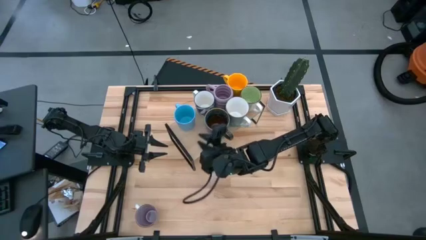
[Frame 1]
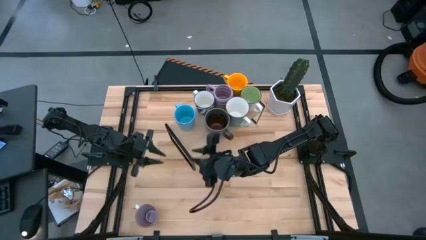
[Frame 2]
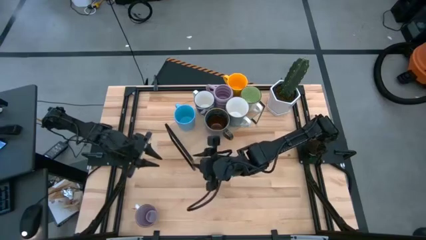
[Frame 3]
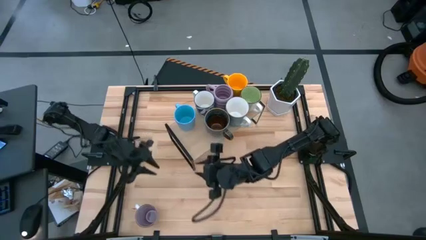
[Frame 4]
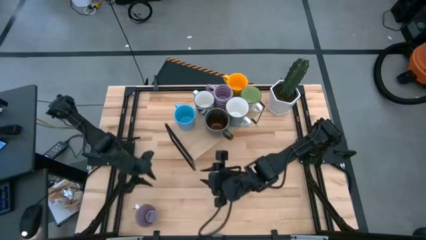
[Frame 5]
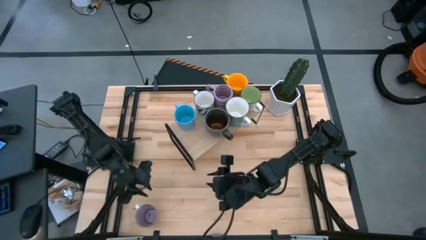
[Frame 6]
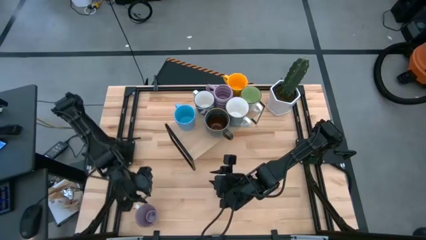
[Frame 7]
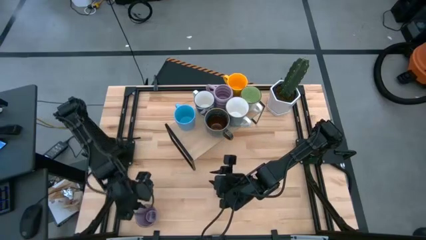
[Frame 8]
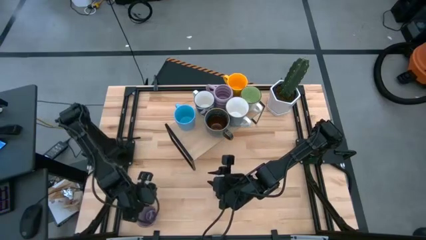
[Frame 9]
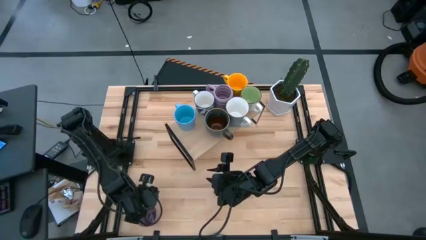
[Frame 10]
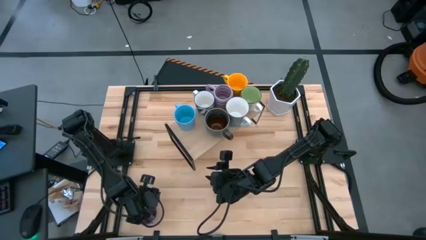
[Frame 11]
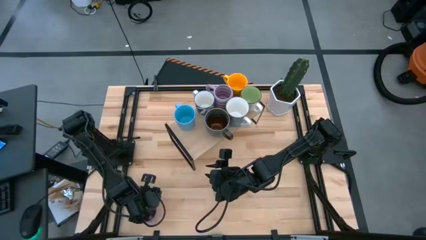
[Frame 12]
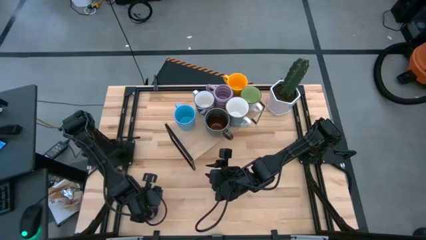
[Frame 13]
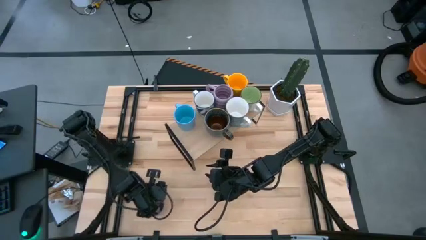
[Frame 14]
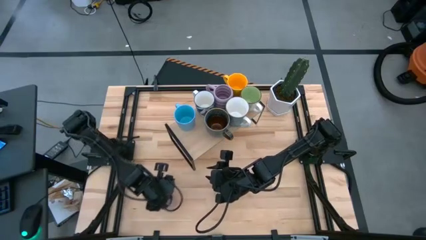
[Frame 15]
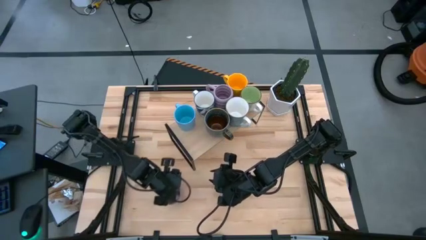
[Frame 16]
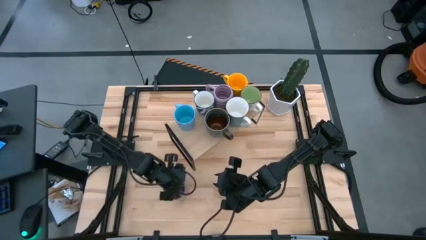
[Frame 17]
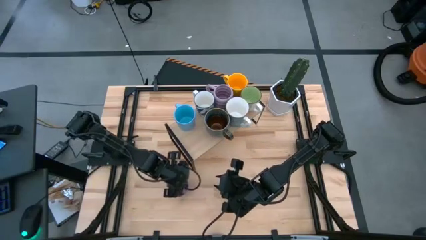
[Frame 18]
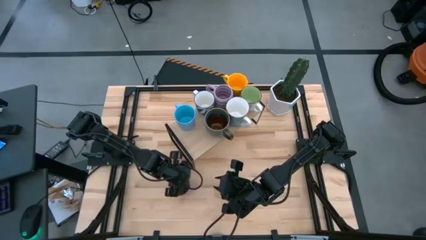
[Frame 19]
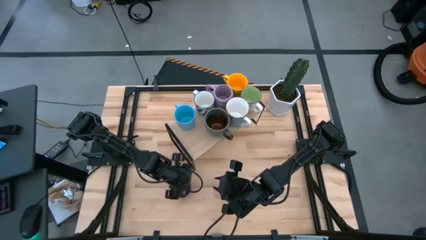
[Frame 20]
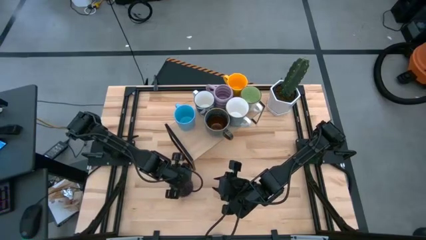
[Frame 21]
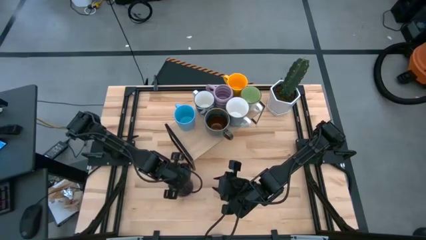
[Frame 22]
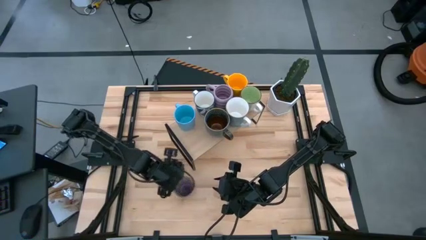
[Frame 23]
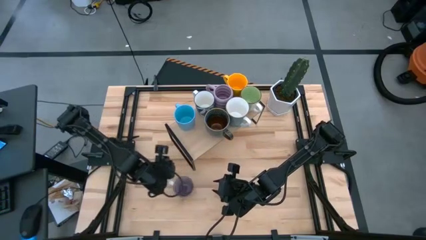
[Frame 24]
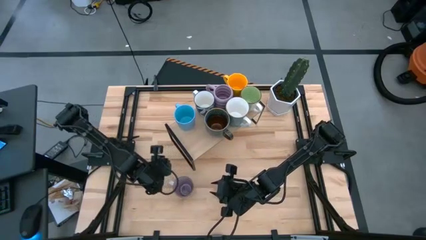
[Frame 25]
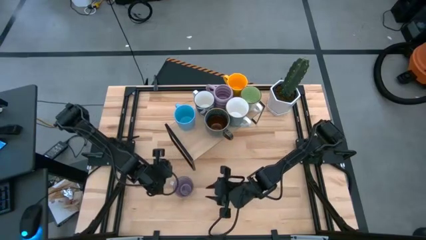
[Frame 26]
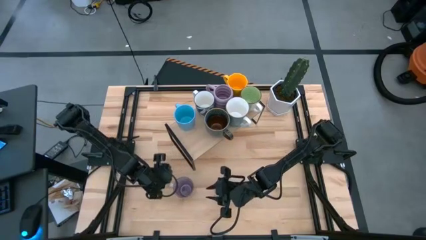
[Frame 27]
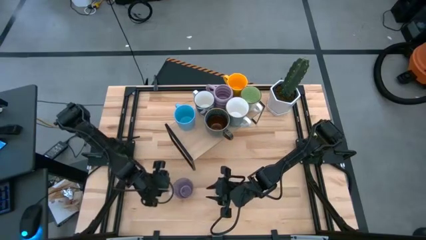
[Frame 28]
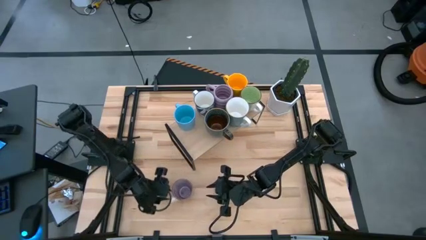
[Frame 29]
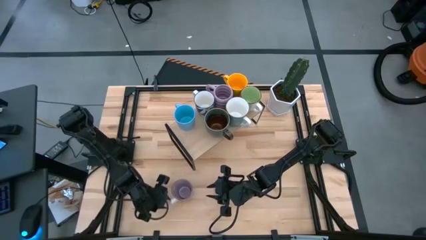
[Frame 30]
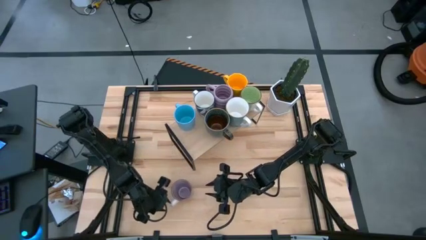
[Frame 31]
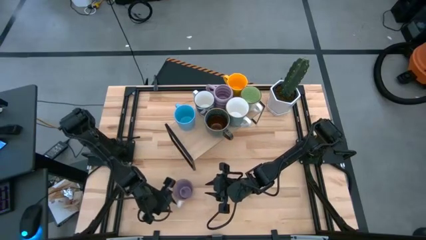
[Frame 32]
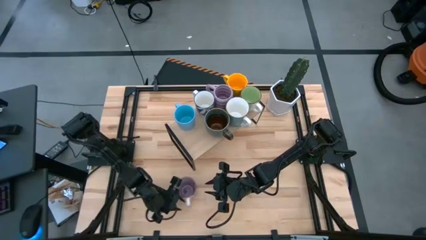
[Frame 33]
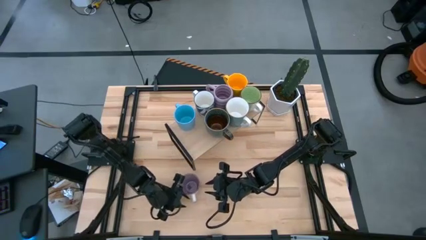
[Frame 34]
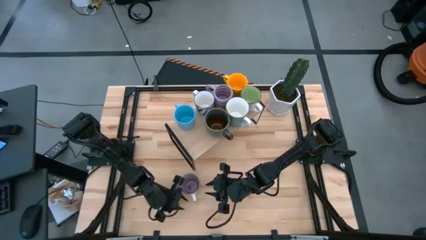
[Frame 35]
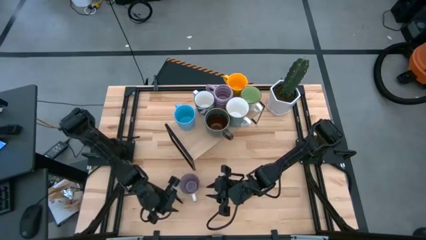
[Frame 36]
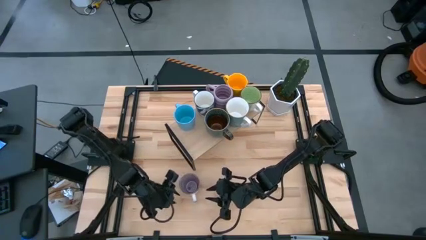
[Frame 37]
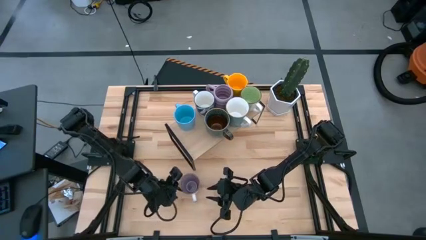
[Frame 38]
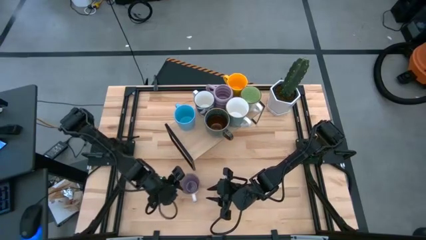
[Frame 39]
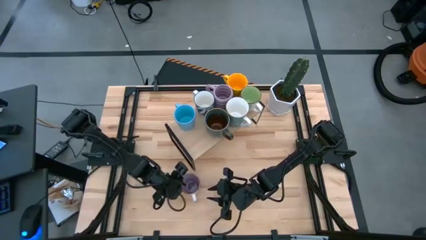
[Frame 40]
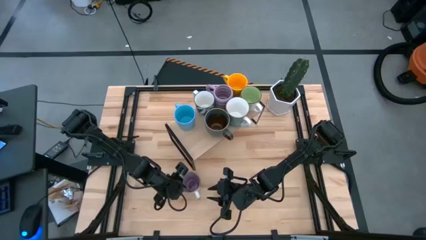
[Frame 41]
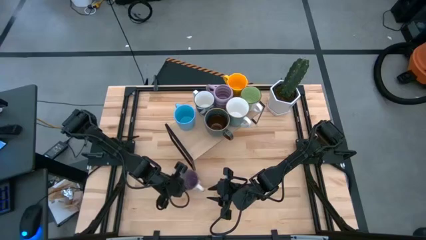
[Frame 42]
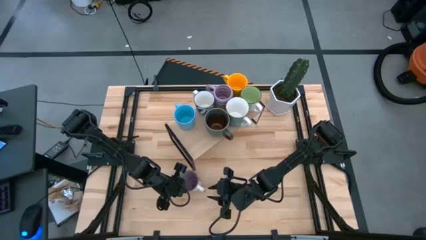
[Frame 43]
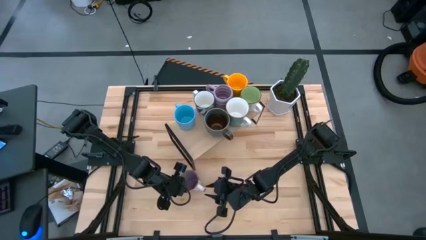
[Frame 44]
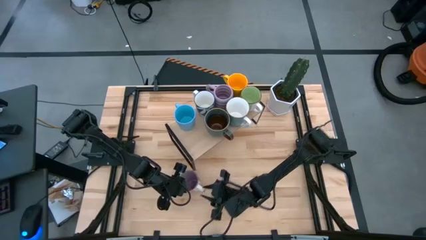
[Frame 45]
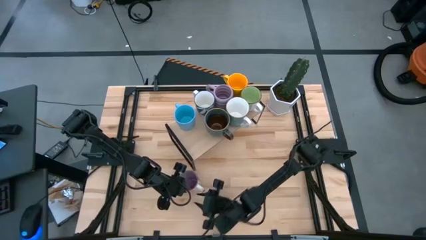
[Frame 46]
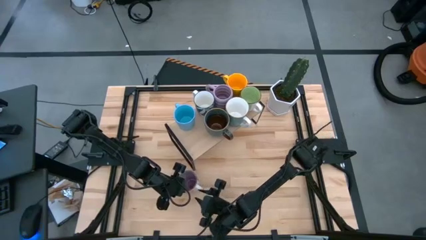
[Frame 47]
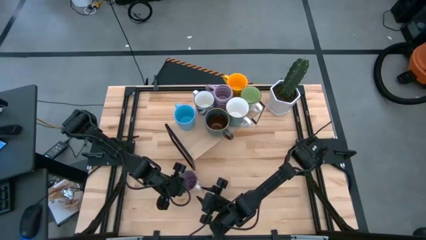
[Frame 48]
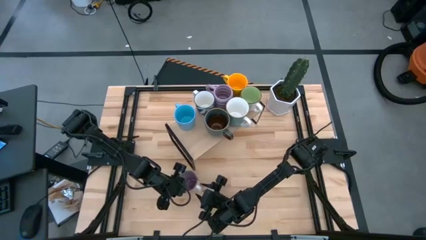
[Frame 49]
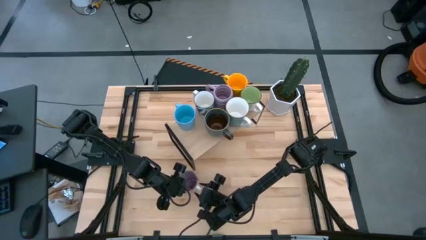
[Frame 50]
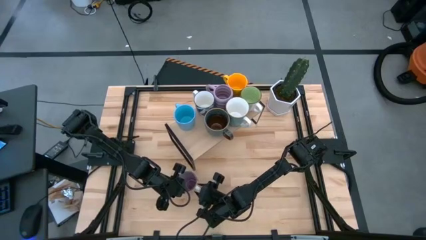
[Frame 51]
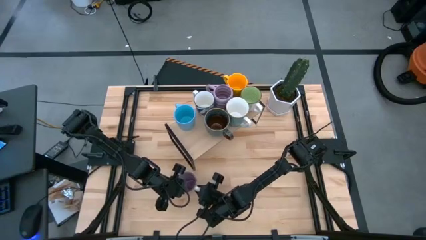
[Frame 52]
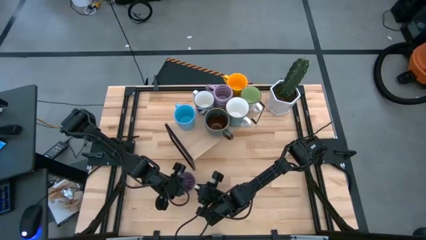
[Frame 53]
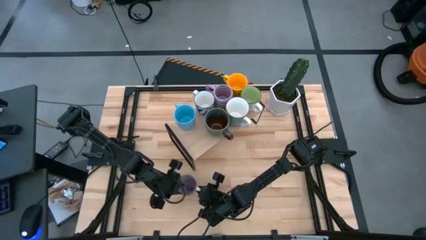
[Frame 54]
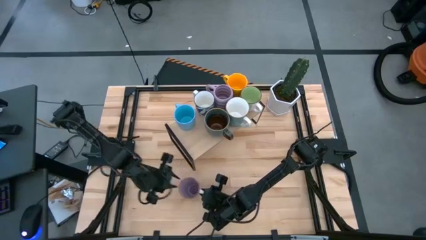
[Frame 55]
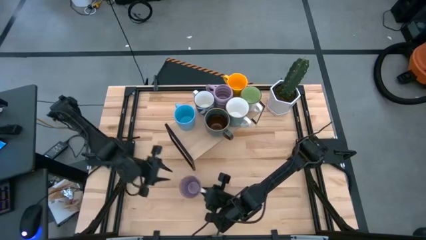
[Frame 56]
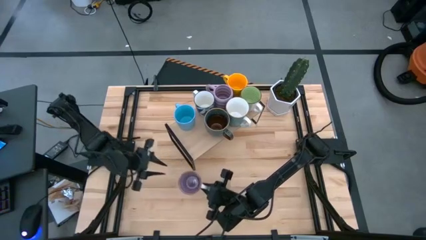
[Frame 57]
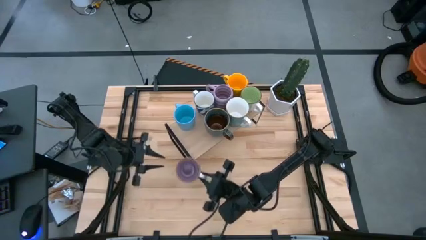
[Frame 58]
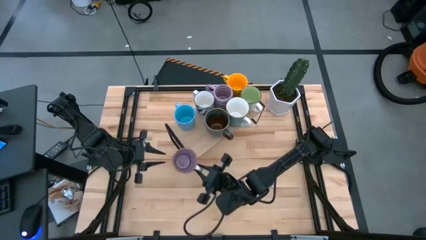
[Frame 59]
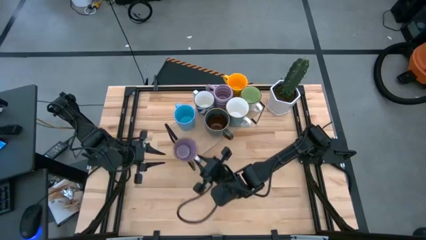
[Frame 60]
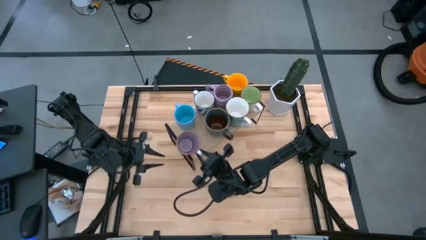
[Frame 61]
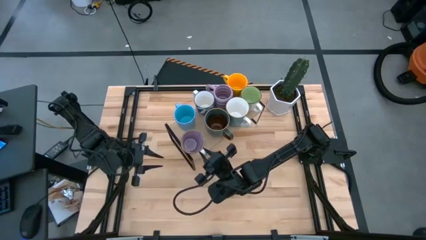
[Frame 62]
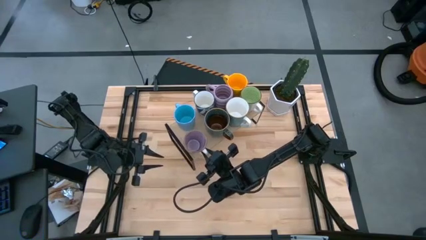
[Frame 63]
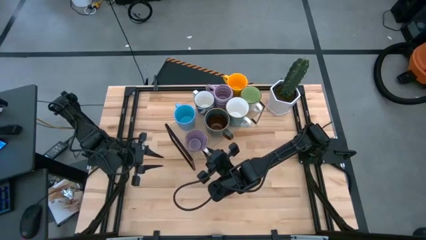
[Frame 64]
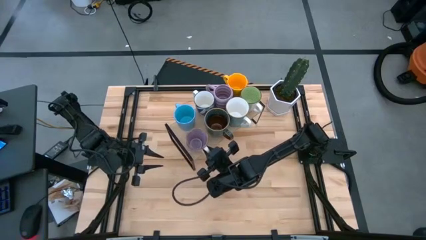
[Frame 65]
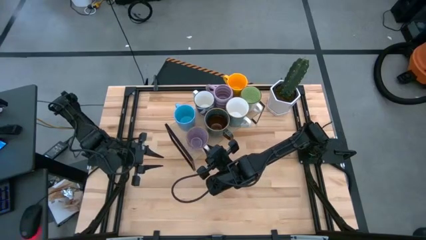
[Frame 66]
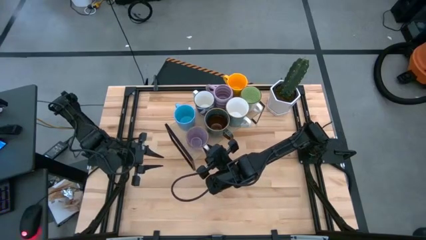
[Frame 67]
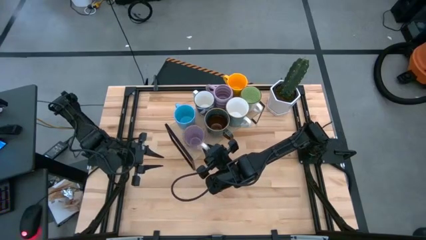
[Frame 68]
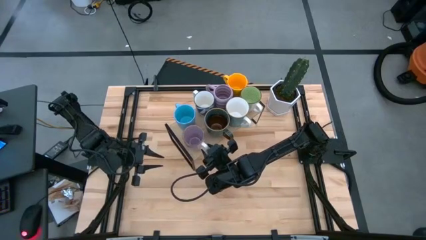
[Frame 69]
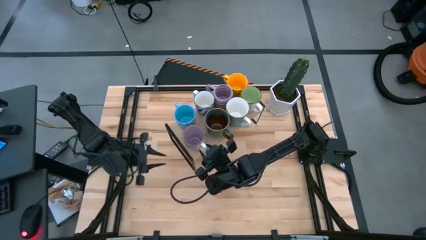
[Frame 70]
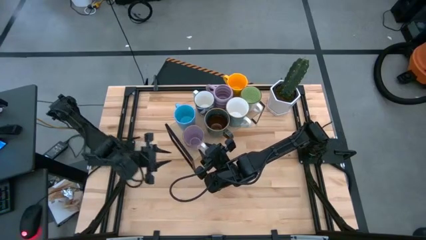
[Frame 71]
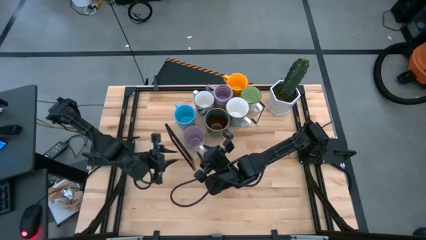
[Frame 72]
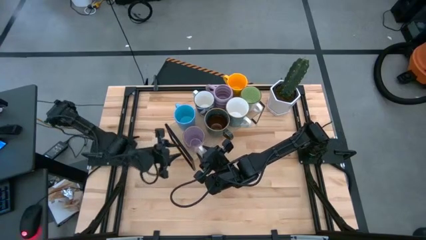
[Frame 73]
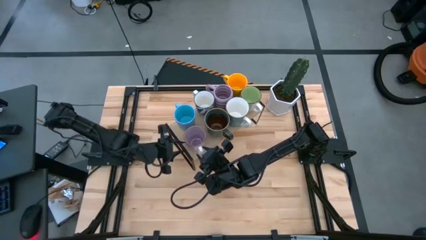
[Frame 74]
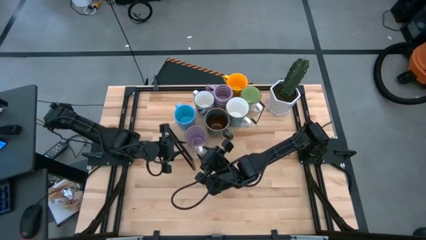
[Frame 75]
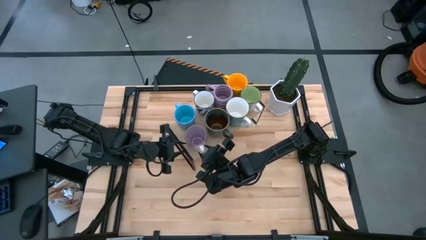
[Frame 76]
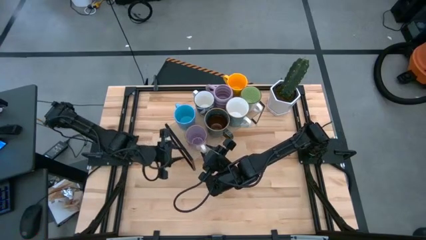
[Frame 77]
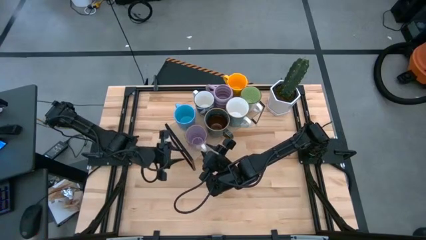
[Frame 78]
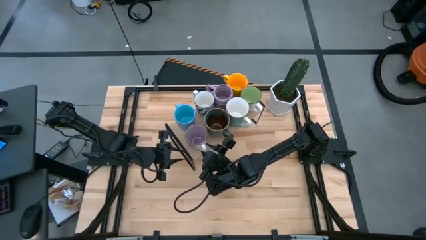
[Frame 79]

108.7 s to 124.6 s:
Task: Place coffee mugs
Put the purple mug on the shelf
